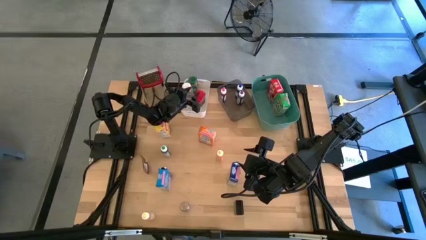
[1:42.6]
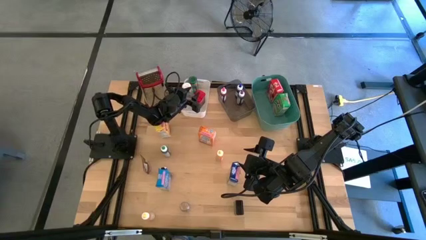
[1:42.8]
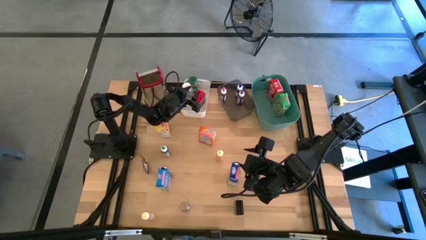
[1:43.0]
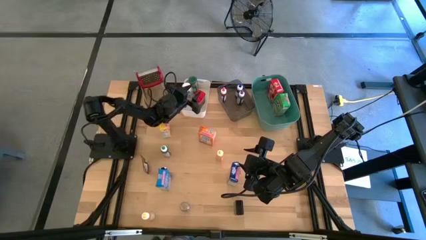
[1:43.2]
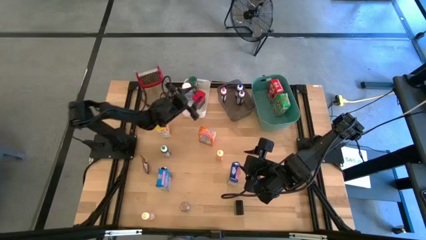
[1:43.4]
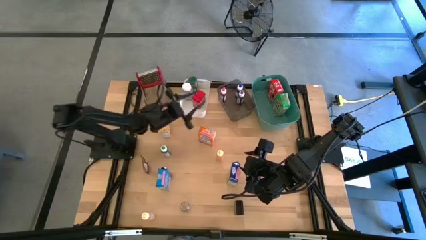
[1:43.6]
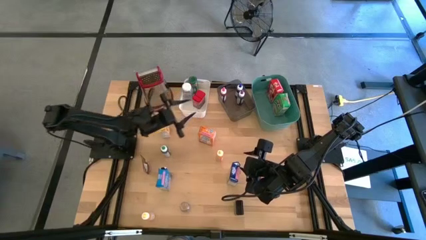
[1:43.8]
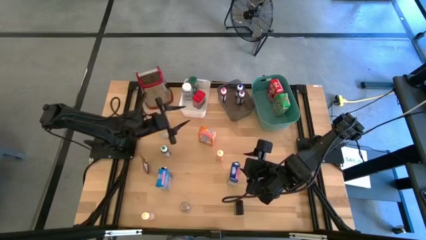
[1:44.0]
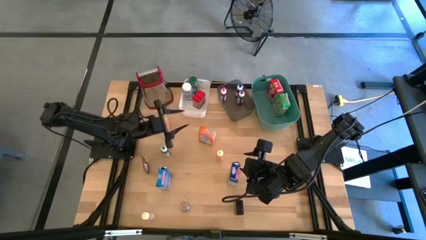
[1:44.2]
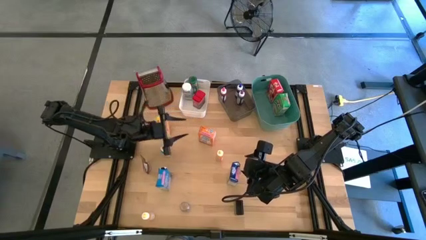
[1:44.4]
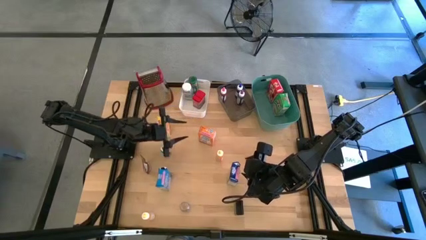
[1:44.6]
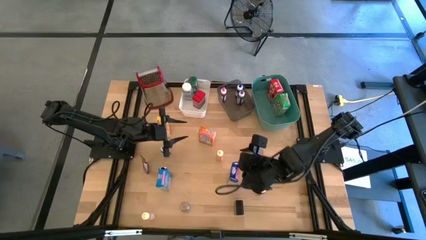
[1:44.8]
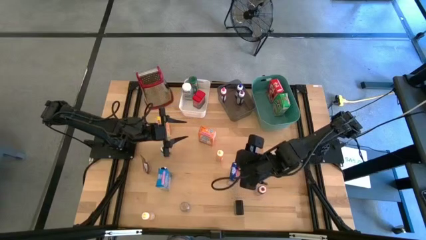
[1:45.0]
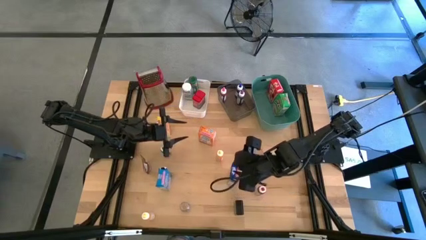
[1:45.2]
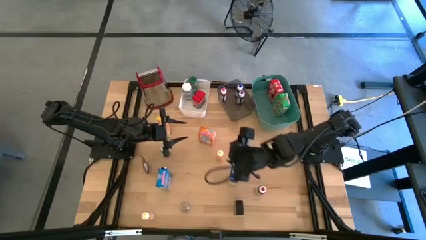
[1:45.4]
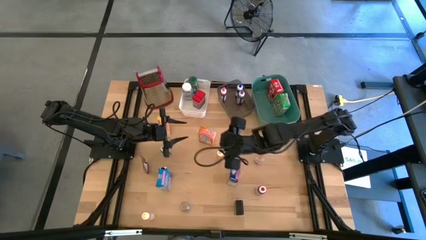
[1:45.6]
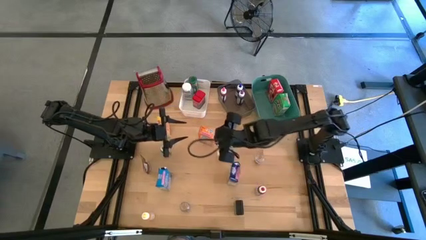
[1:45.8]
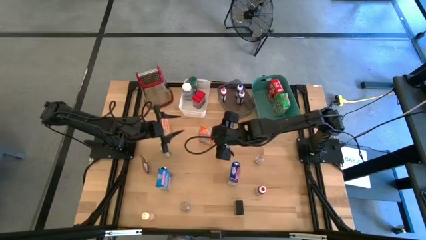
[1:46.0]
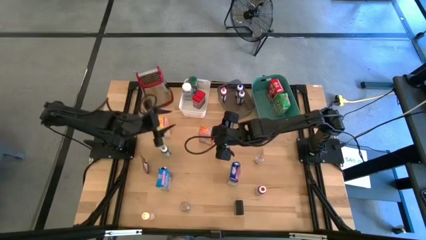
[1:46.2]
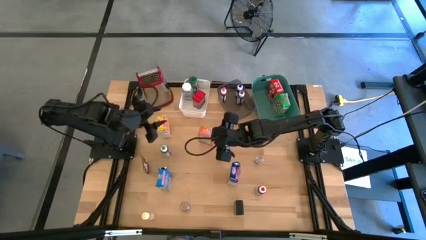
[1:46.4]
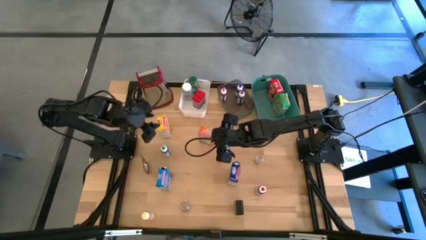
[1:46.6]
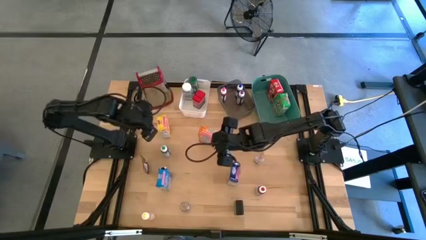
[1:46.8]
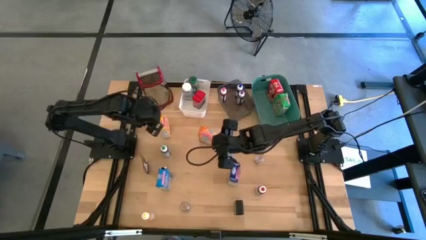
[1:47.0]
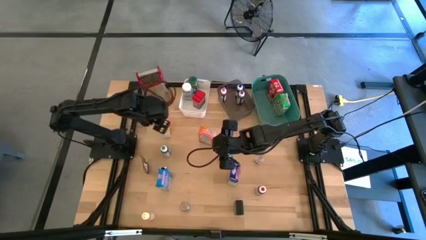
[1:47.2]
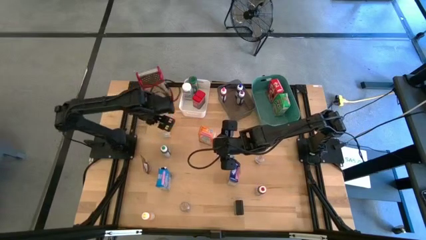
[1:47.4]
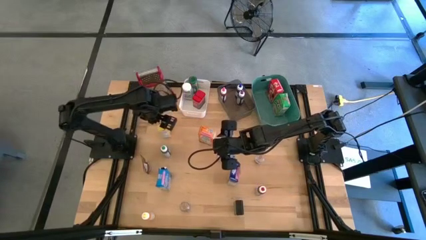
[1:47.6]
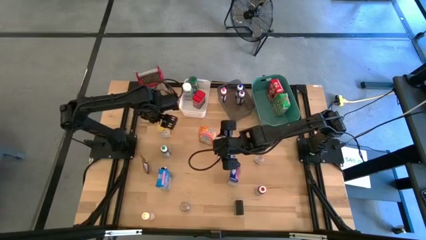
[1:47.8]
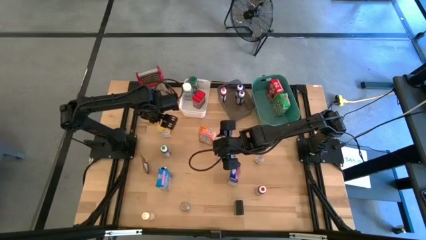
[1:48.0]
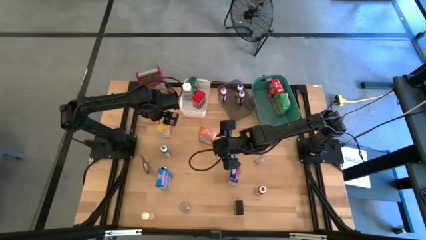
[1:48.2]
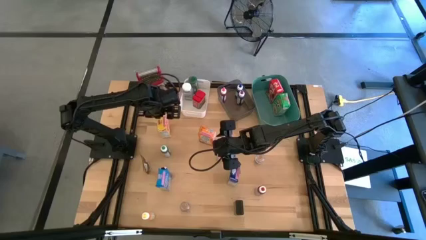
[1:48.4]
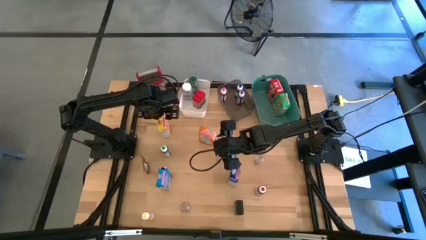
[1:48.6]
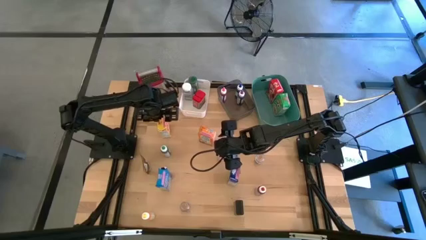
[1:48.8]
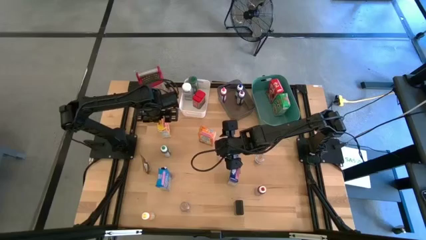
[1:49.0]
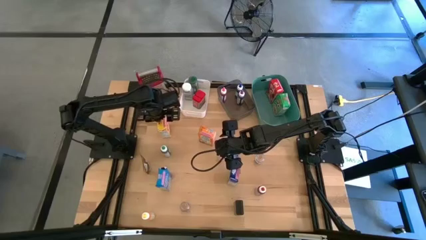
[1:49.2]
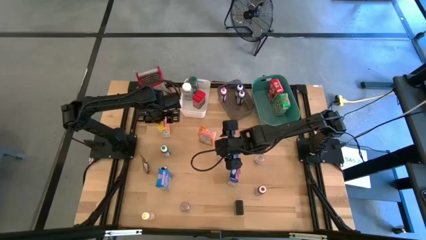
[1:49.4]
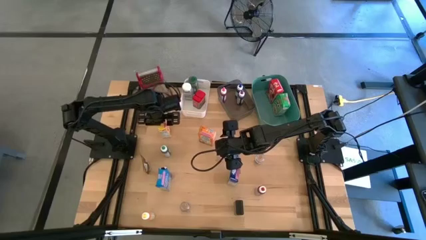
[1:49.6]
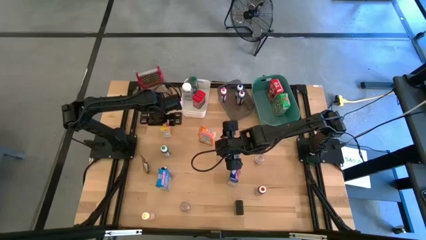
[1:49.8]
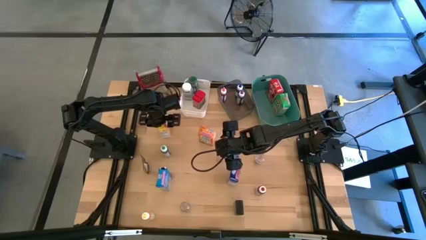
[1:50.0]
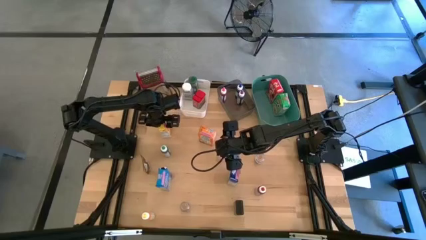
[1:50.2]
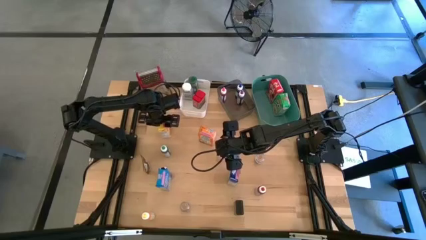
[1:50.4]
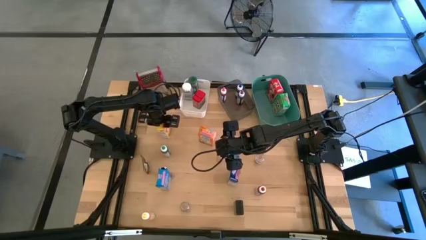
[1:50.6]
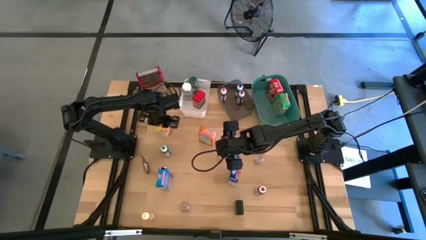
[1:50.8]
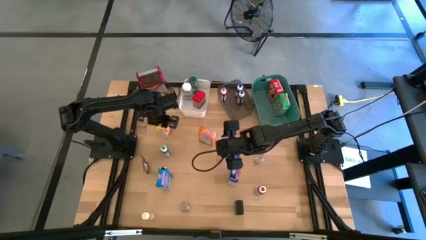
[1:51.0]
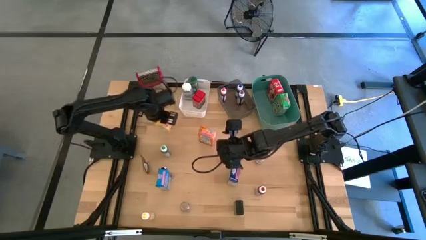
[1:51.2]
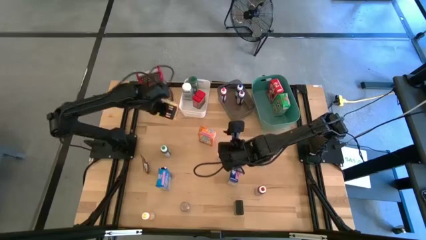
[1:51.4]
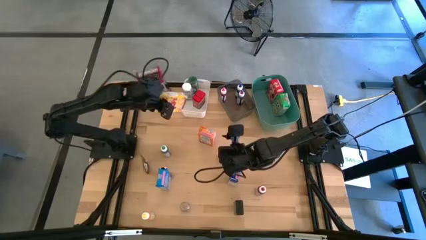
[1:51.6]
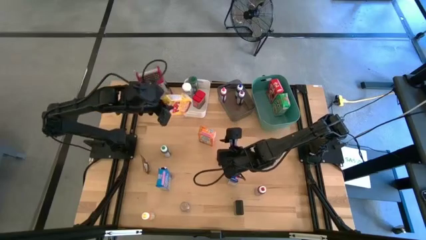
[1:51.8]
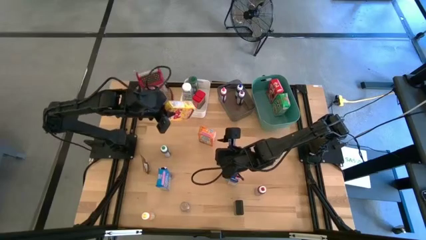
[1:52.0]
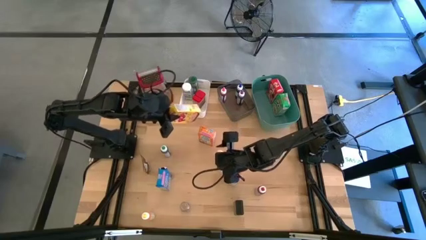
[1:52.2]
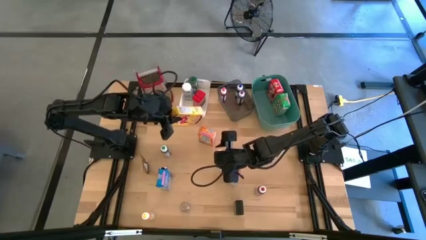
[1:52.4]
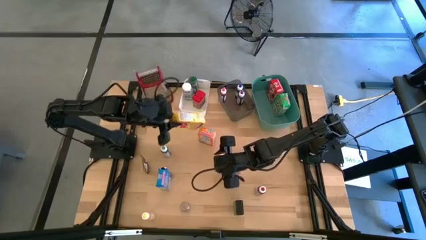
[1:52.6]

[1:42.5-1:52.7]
Task: Pick & Place Kitchen Items
Put the yellow cereal box into the green bin

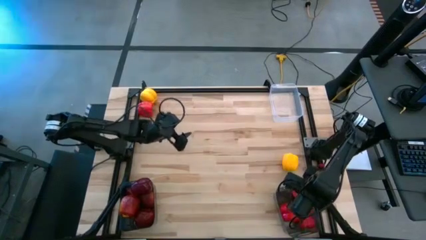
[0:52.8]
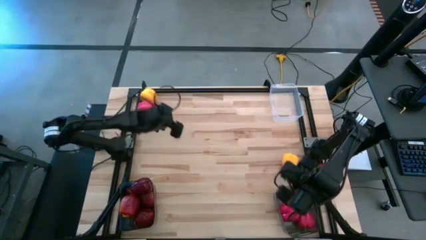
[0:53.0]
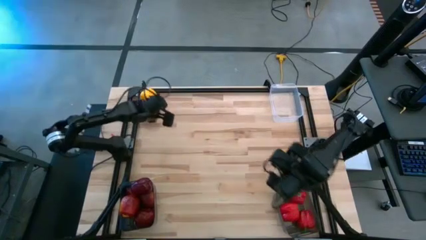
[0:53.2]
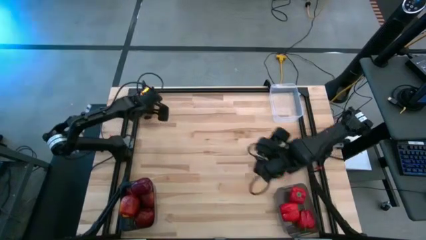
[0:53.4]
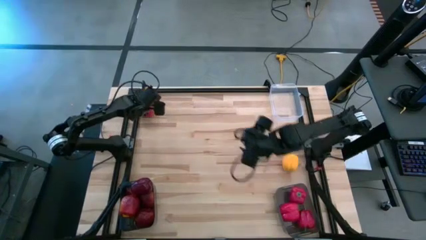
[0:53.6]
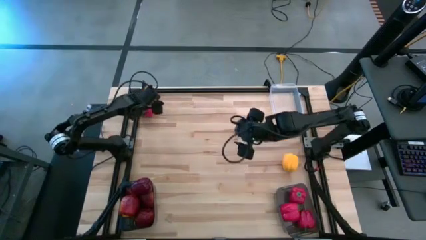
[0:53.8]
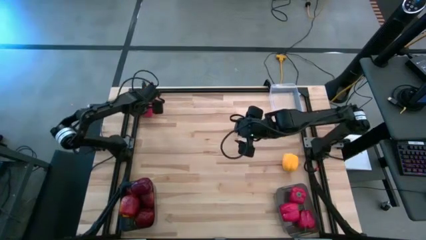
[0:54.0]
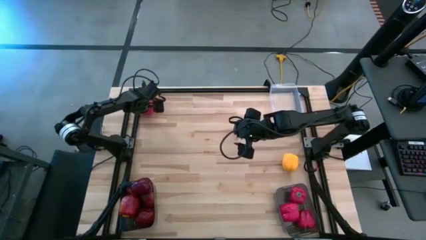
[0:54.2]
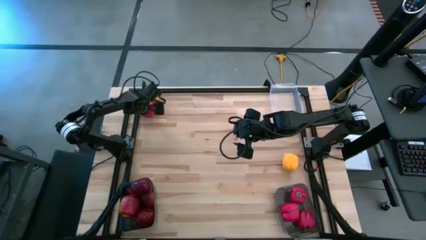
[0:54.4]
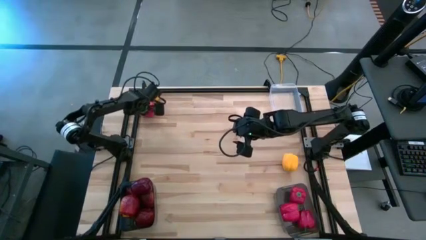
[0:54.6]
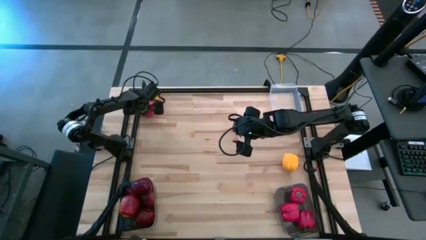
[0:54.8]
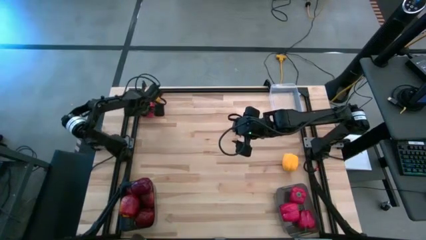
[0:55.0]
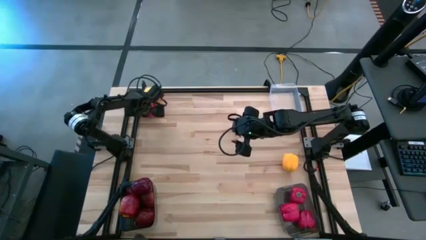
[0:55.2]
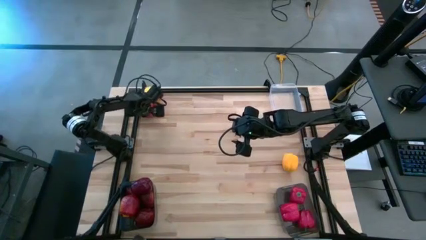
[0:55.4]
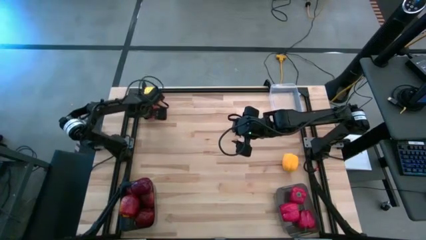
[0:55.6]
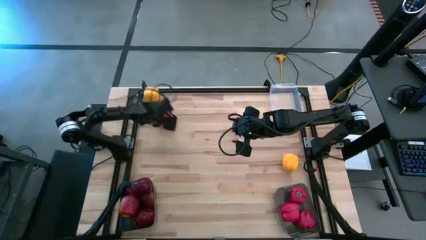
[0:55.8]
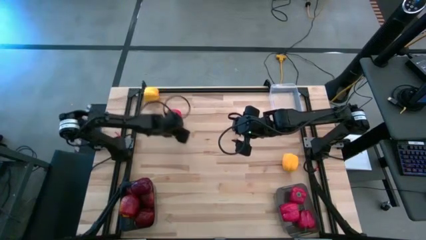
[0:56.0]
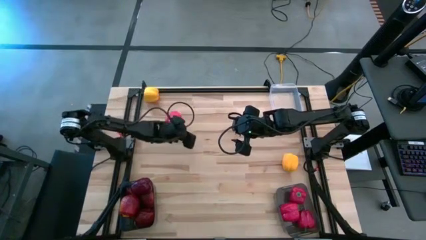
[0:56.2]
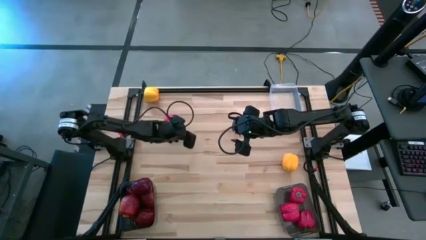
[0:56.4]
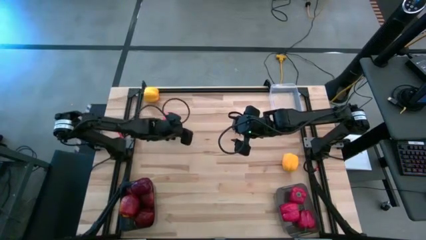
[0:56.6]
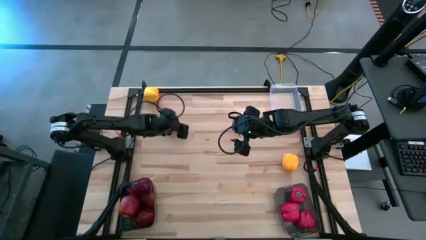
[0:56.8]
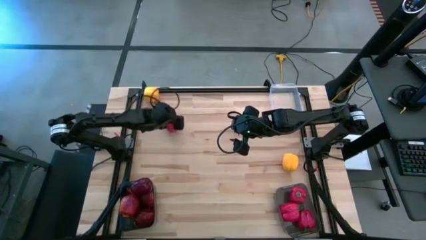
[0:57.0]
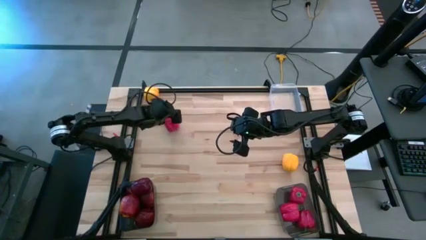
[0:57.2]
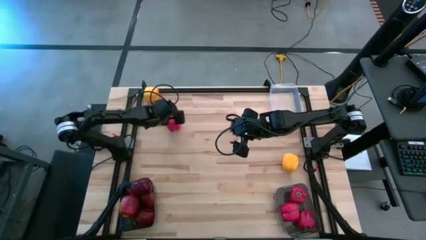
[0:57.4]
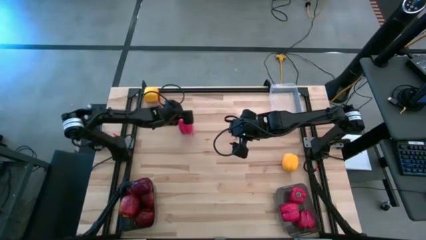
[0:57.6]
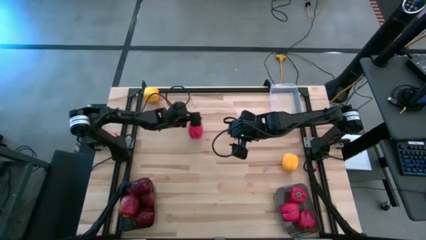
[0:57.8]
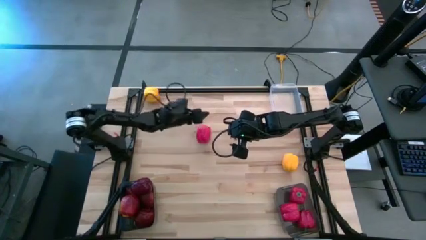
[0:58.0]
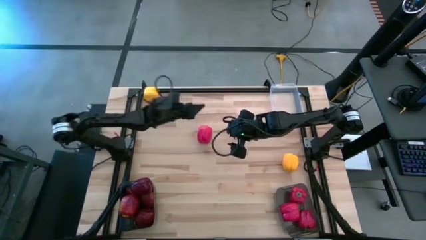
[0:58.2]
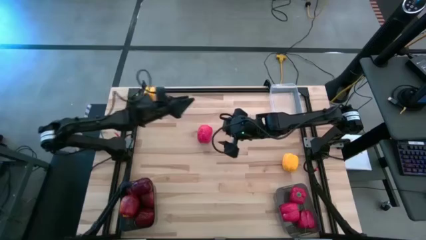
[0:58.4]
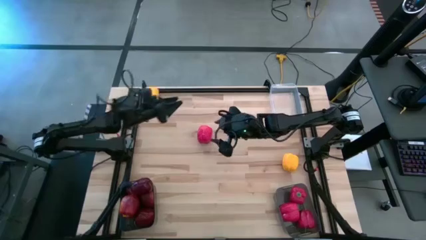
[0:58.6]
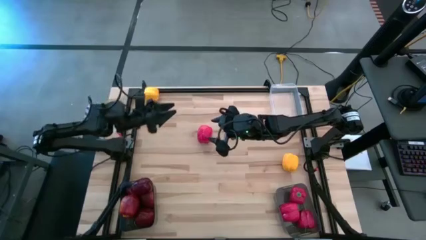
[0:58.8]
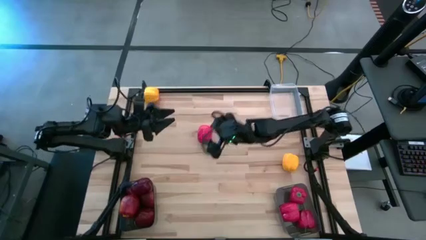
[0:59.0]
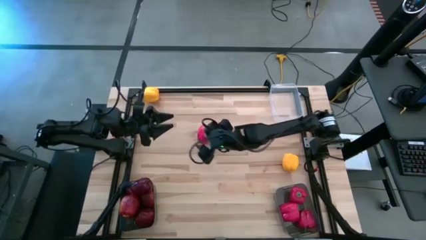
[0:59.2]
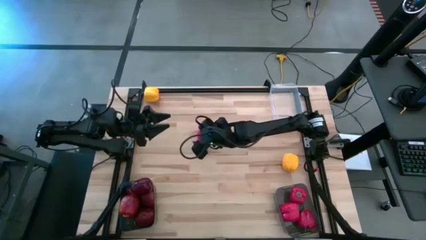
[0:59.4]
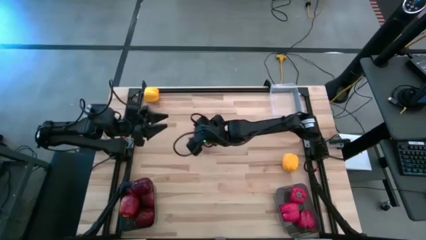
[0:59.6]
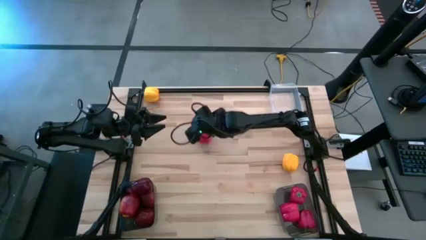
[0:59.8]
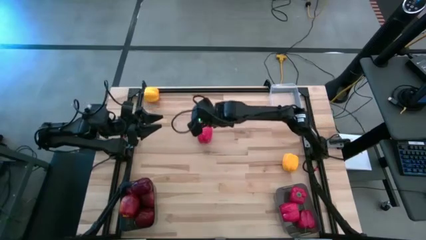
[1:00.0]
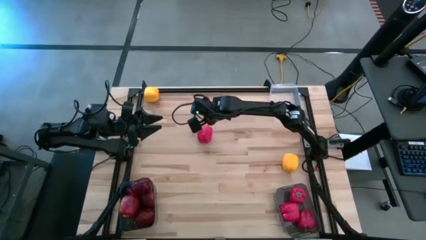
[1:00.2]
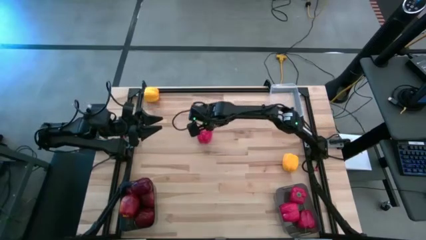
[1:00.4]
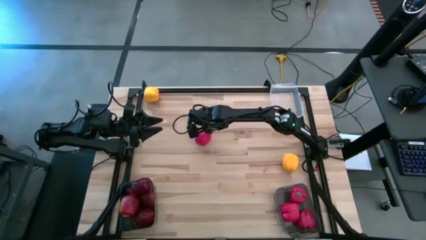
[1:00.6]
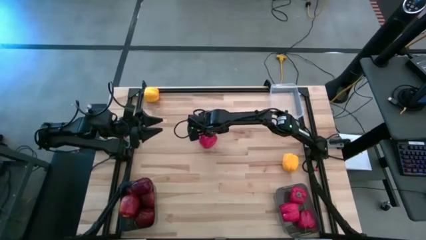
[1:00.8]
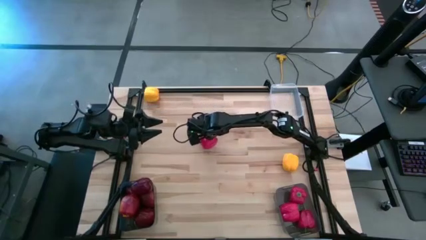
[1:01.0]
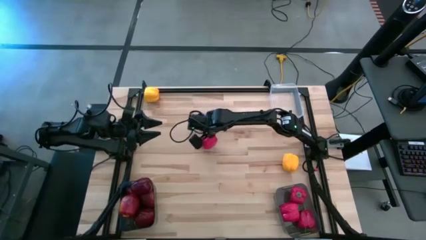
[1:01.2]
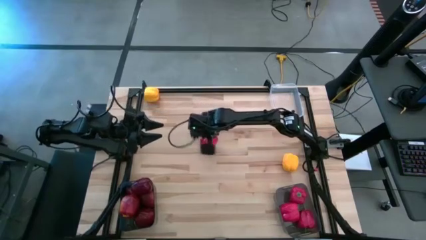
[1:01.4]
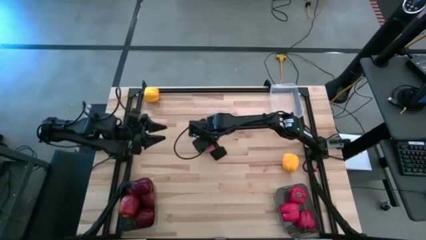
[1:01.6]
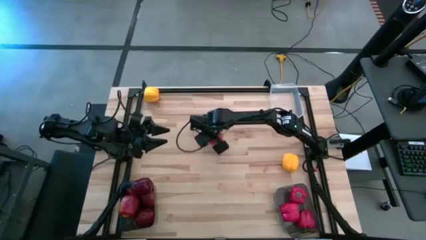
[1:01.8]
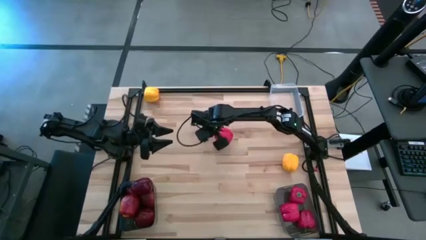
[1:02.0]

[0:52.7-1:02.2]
Task: Sort produce into baskets
Put the red bell pepper into the right black bin
